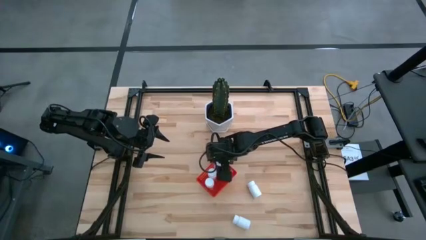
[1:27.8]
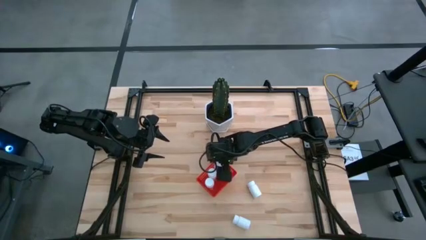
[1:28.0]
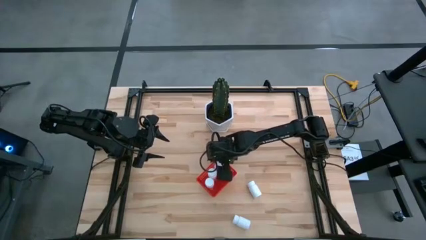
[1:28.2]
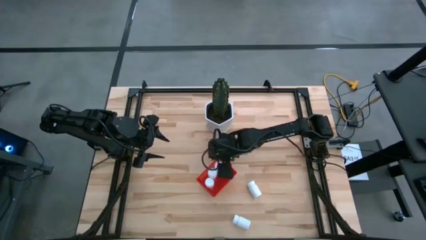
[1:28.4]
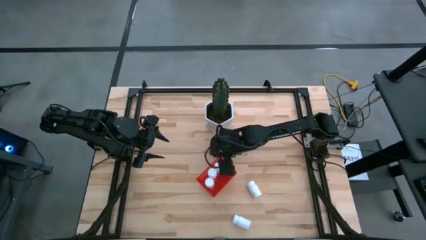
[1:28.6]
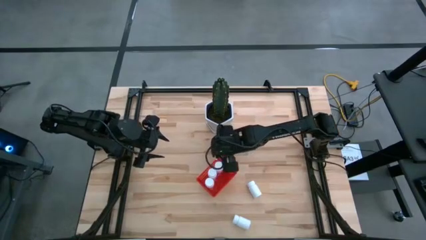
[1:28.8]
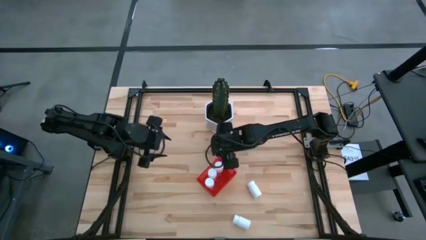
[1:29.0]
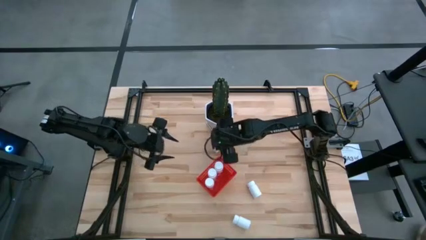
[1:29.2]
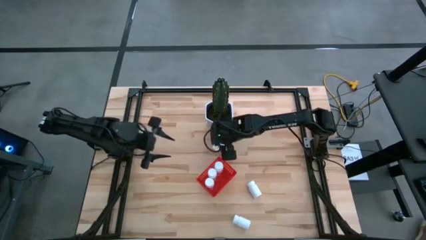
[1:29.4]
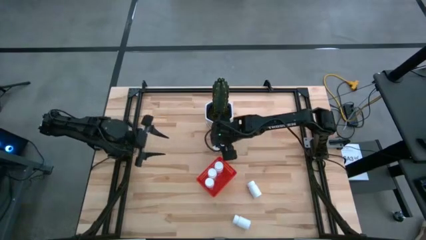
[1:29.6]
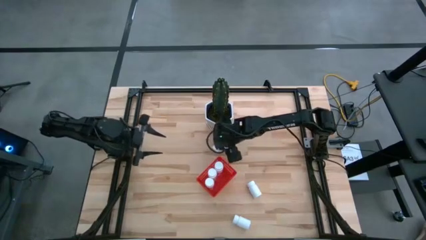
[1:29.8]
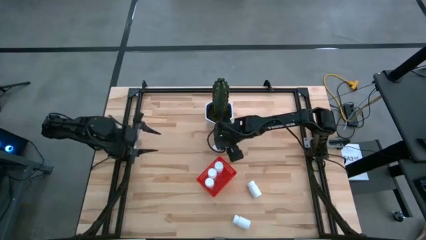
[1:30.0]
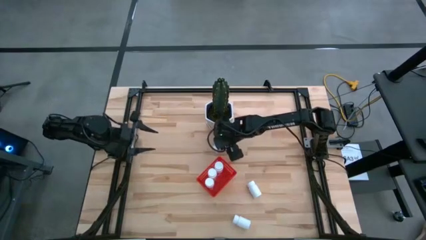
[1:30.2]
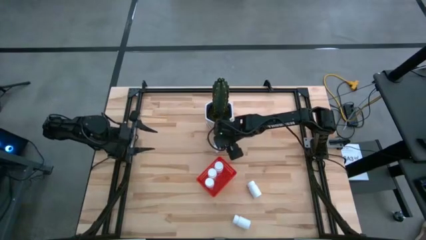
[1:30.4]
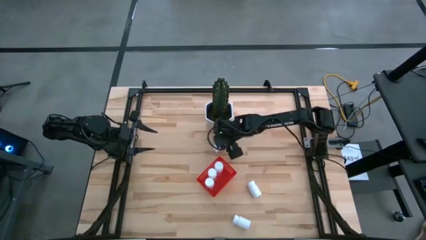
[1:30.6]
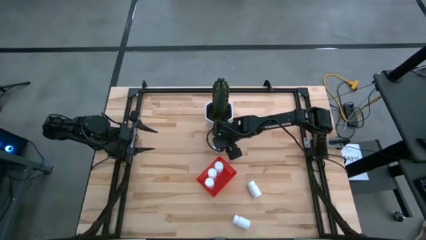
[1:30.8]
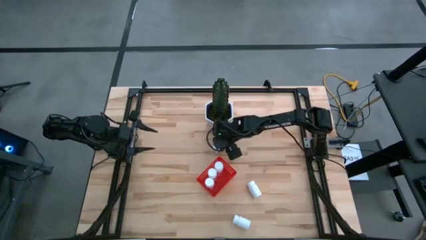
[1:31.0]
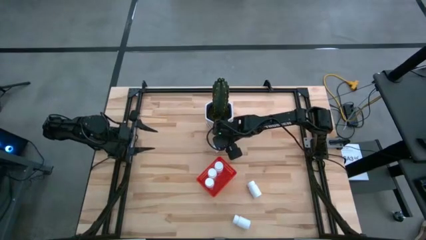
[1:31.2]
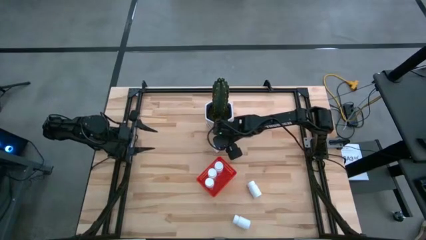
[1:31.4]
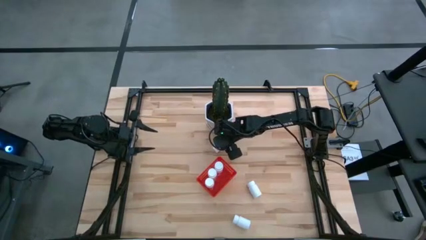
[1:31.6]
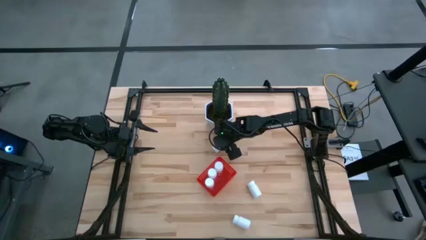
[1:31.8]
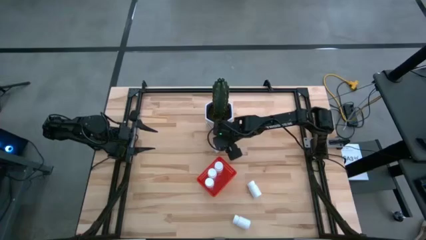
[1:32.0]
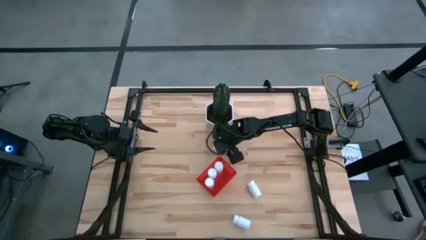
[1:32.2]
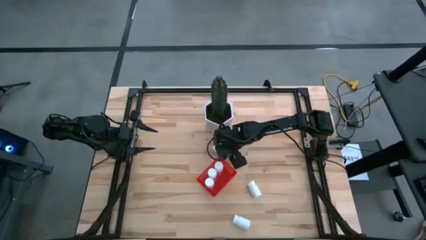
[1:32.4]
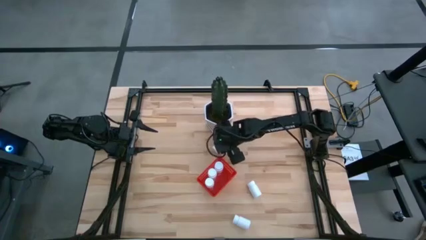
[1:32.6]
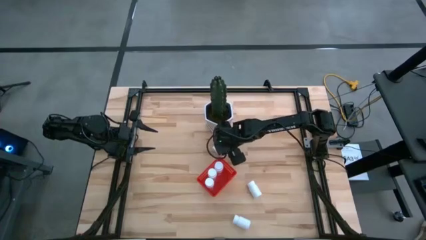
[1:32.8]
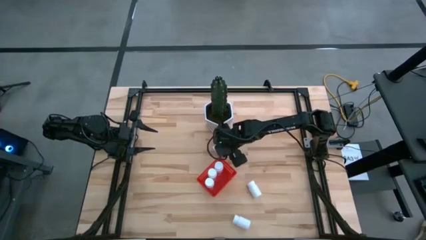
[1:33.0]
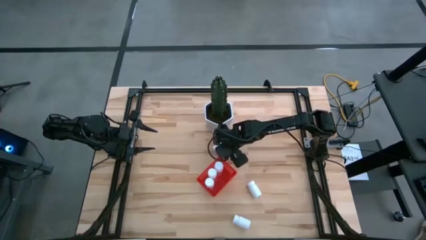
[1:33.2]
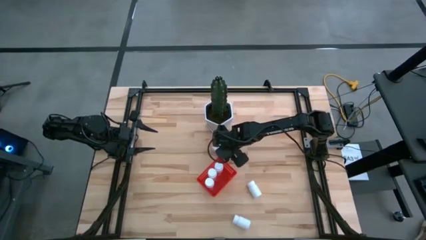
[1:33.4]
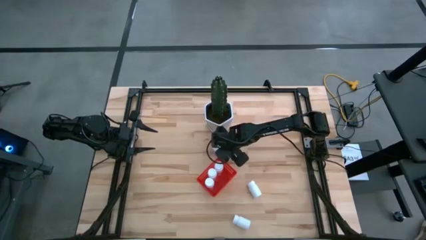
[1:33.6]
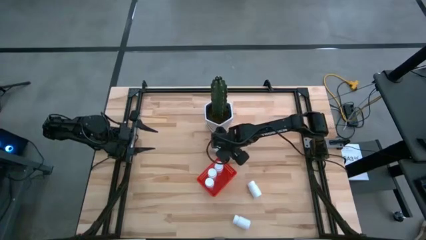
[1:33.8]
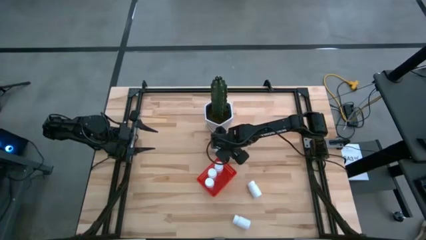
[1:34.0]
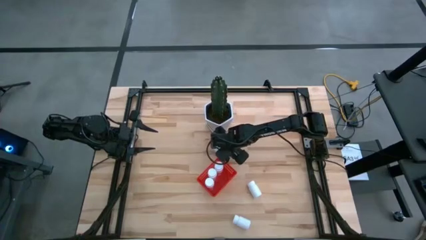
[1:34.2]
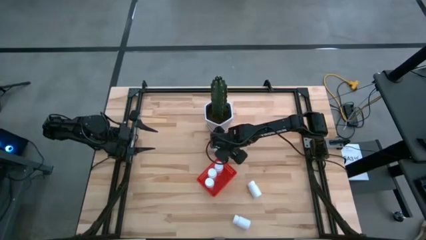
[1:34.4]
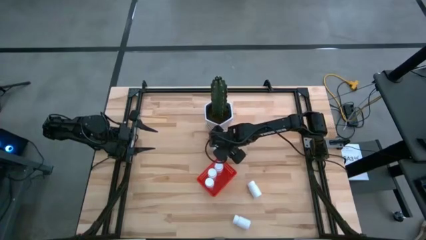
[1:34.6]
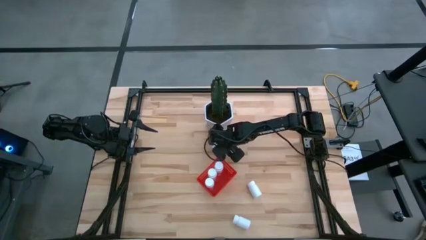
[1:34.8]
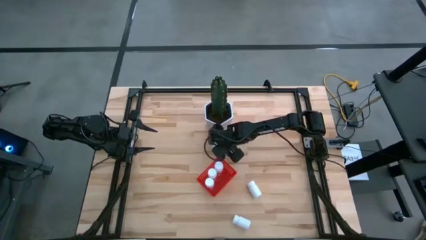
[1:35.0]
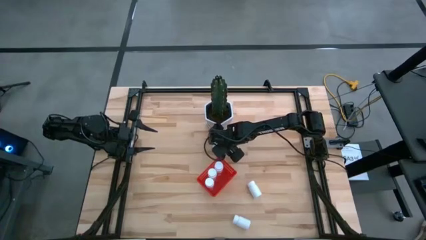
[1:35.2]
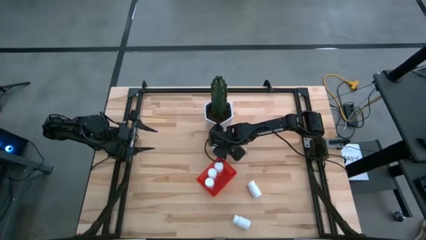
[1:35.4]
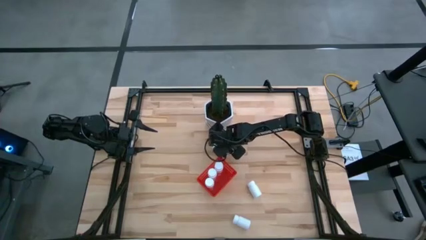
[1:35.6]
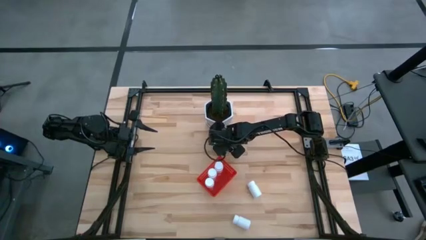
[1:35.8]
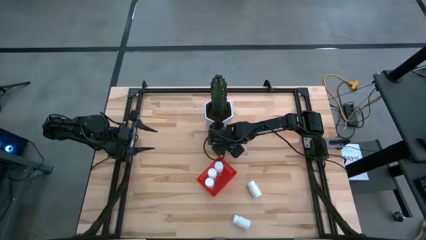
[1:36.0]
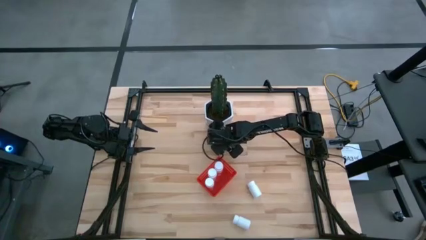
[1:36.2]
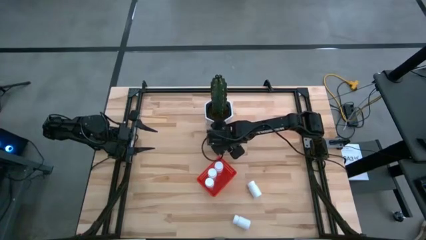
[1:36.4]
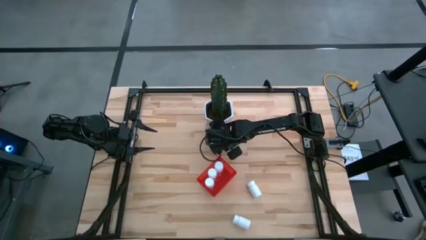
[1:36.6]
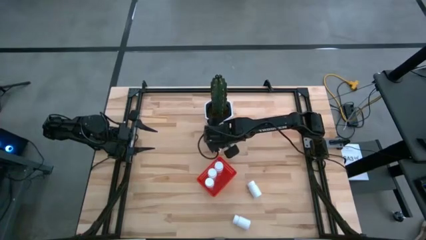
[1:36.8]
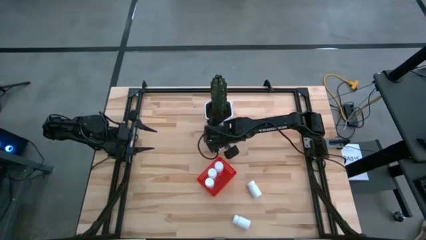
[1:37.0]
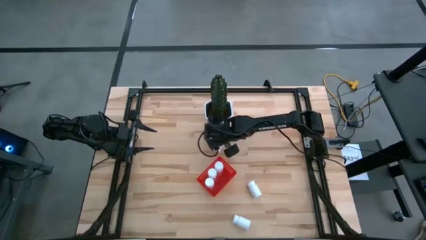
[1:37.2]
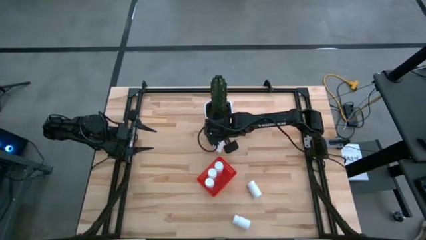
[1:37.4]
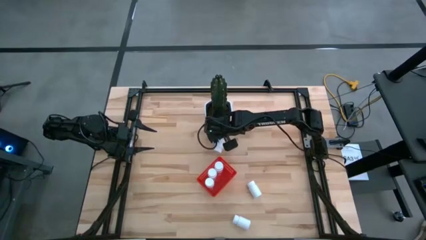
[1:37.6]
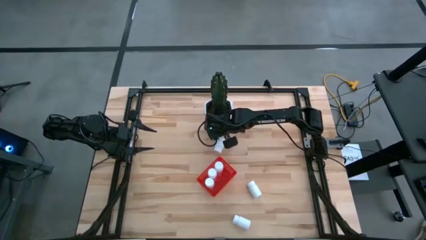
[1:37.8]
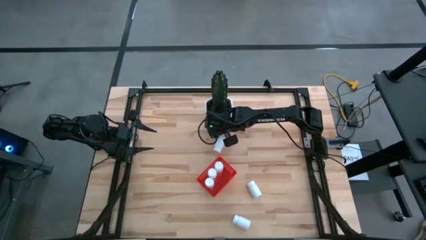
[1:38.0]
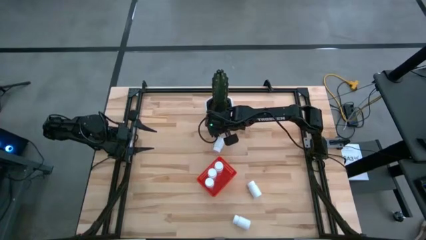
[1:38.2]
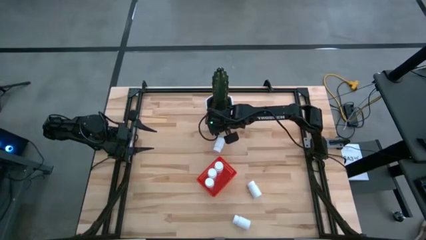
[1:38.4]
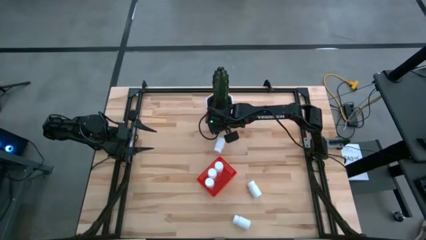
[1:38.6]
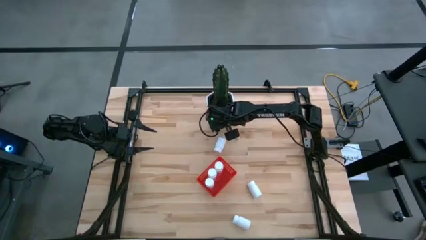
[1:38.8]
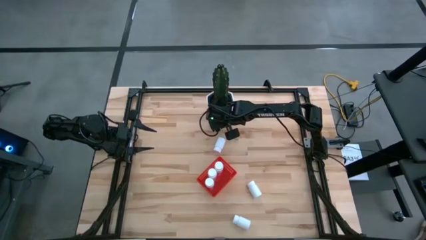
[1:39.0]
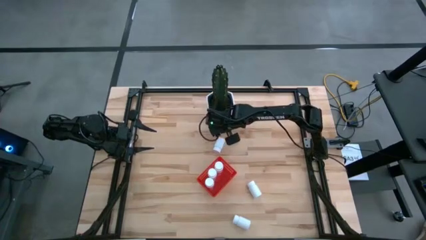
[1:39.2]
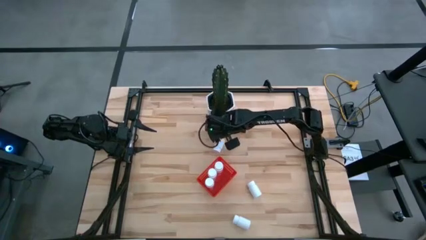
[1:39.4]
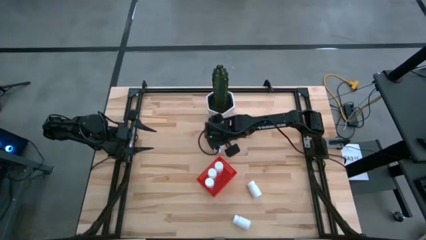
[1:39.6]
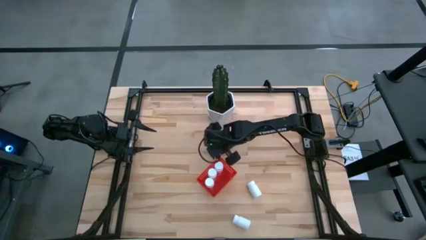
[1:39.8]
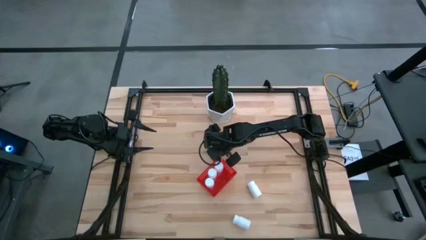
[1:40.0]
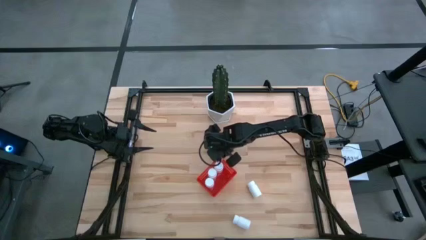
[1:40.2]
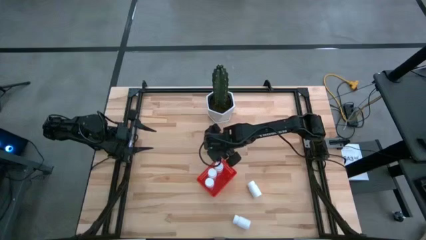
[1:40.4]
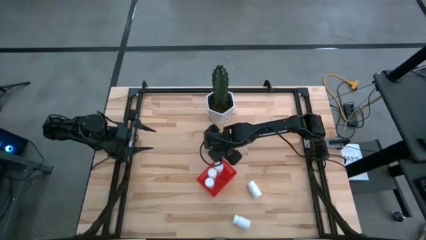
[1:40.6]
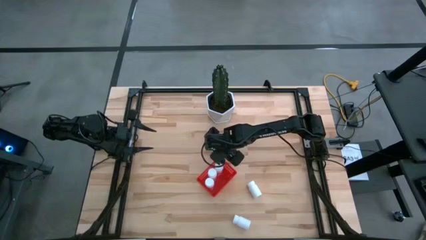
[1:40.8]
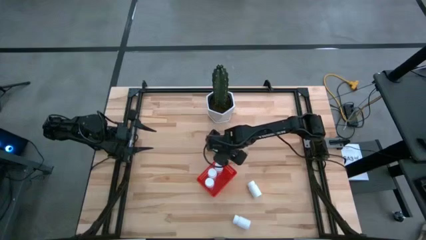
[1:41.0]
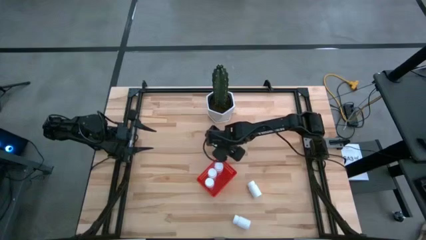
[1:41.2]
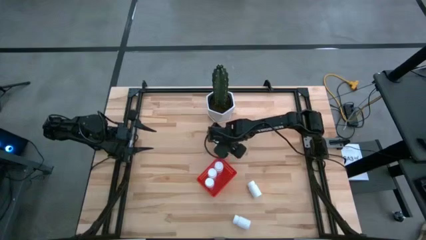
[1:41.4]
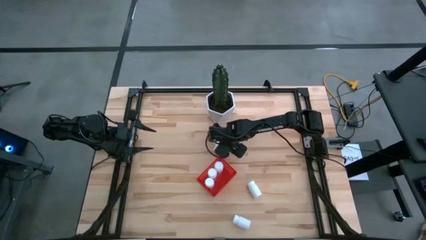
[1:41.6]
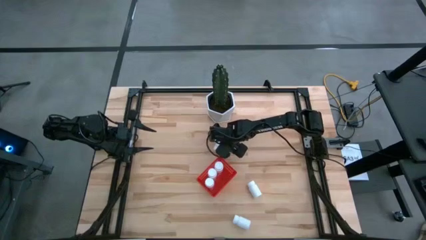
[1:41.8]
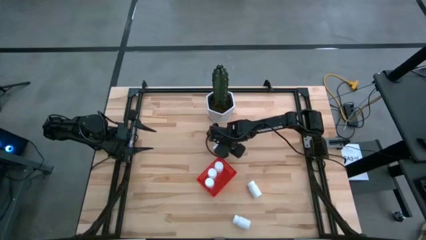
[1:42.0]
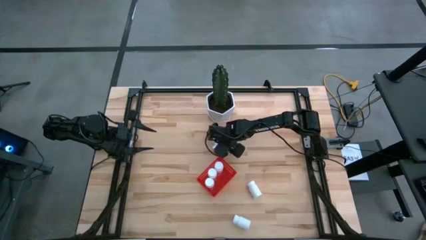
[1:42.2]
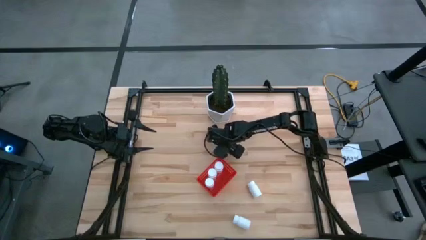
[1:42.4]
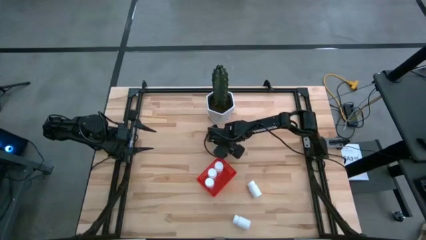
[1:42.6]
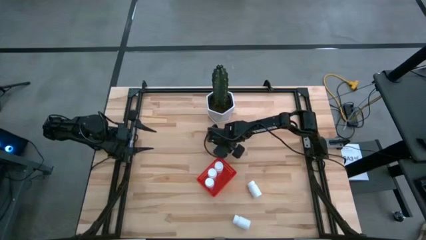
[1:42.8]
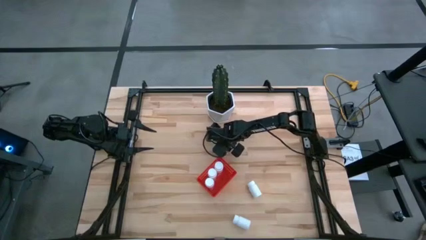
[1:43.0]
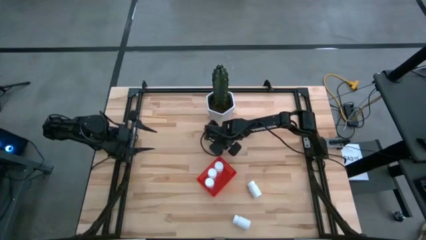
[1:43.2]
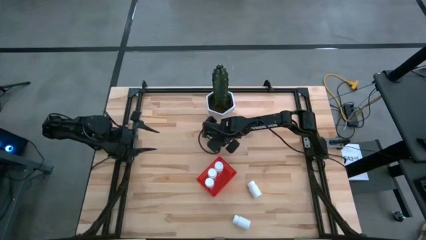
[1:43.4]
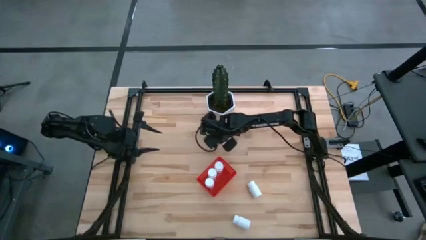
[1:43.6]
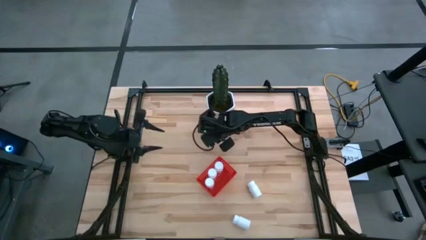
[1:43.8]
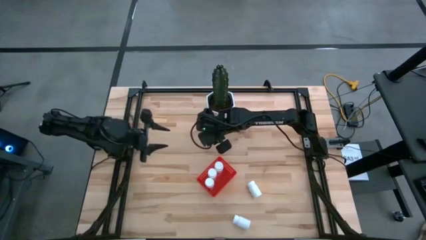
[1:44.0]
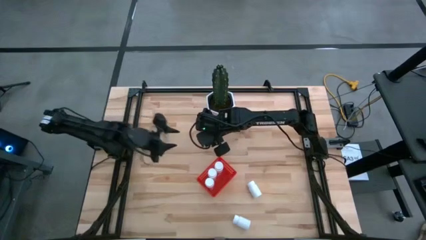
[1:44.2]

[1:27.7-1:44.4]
Task: Pick and place pill bottles into a basket
Put the white pill bottle into the red bin
